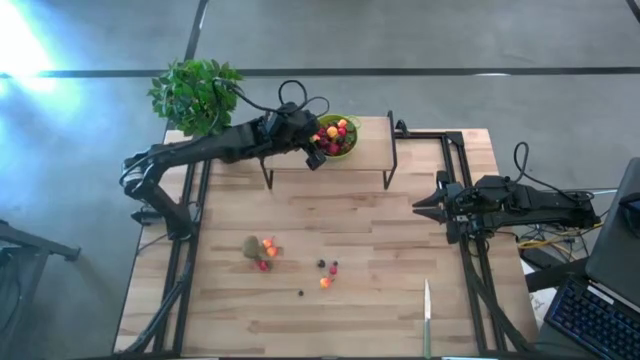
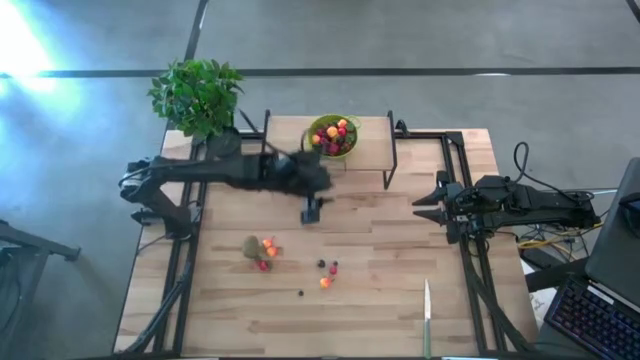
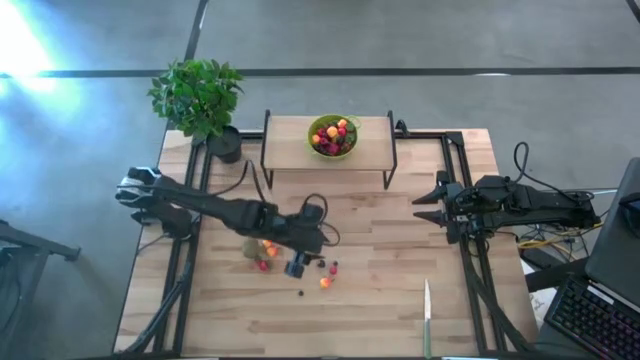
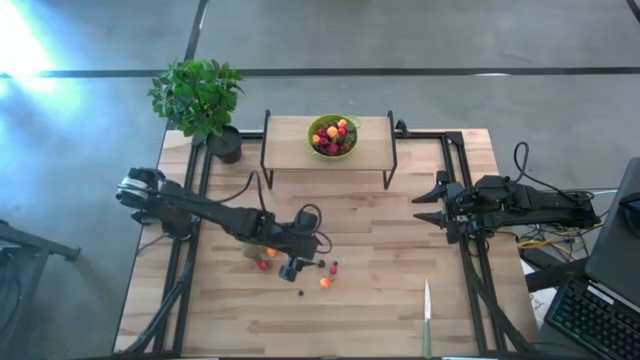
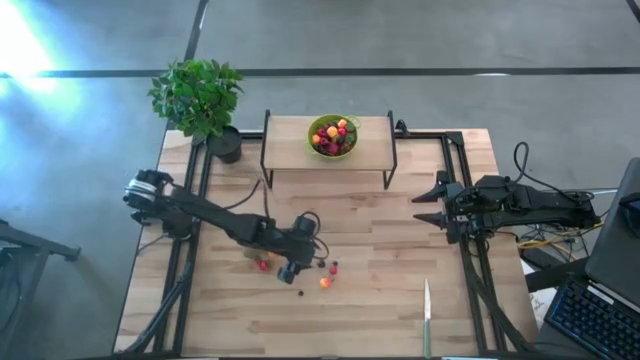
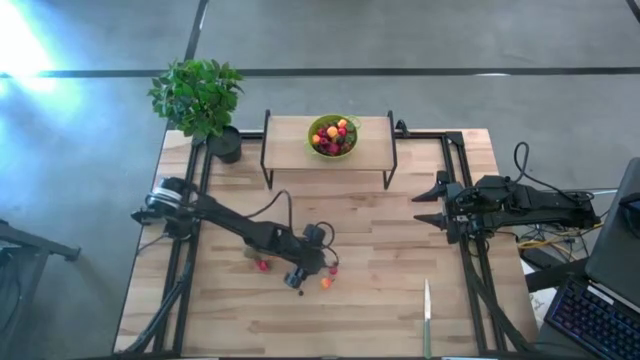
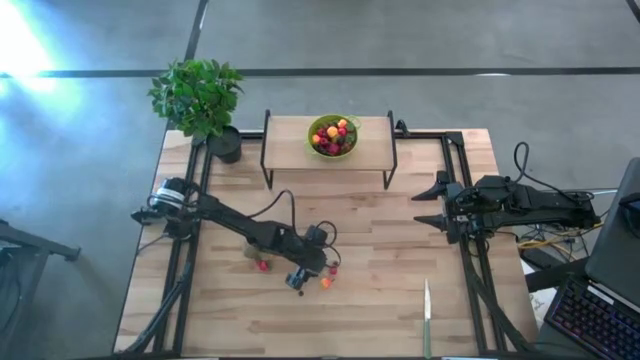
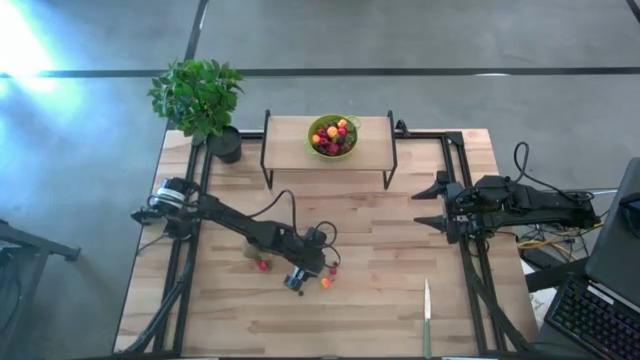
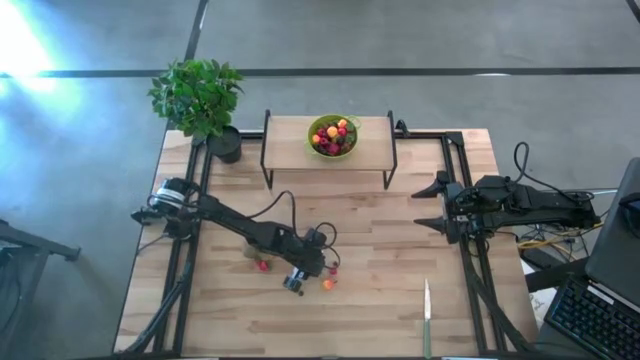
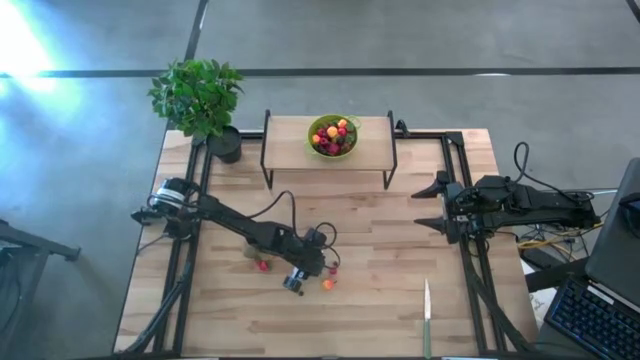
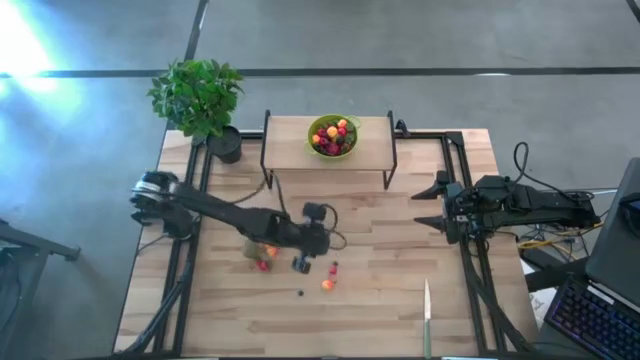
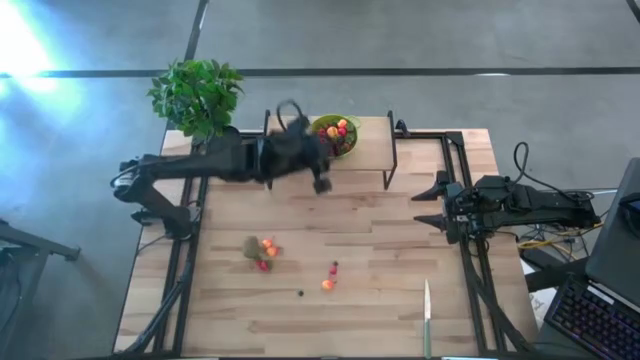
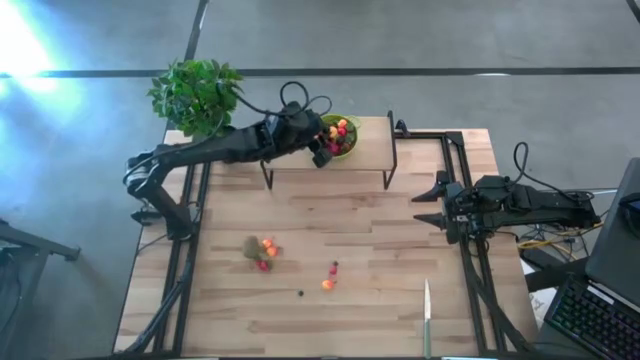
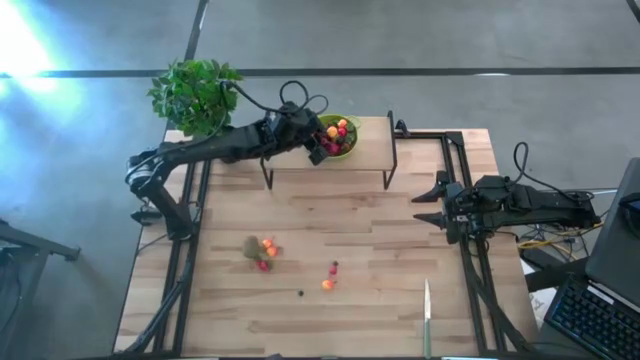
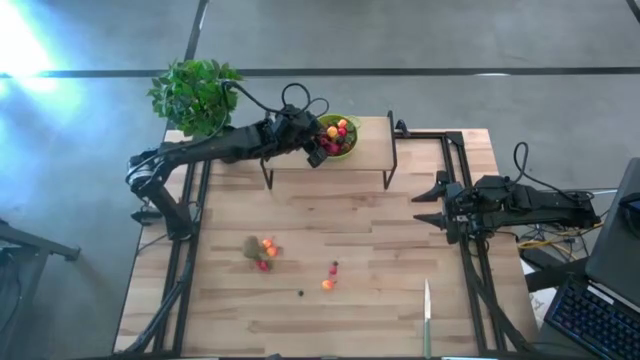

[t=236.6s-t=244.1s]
Task: Pick & Place Fruit
Put the black cherry into the green strainer bowl on the shelf

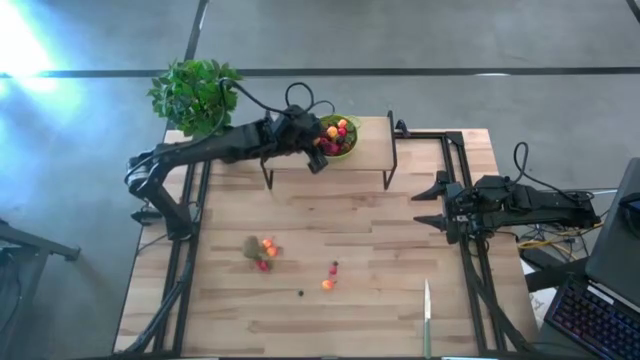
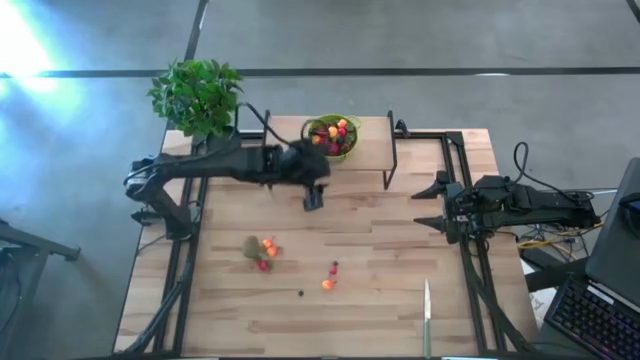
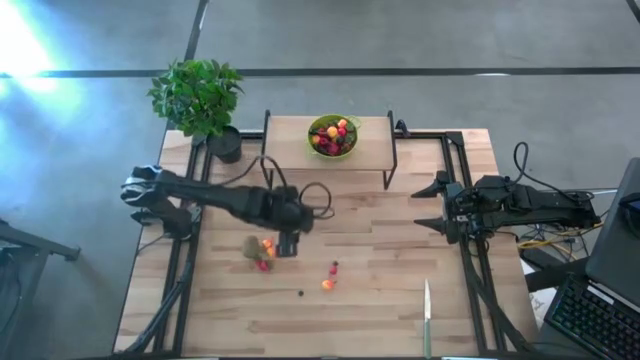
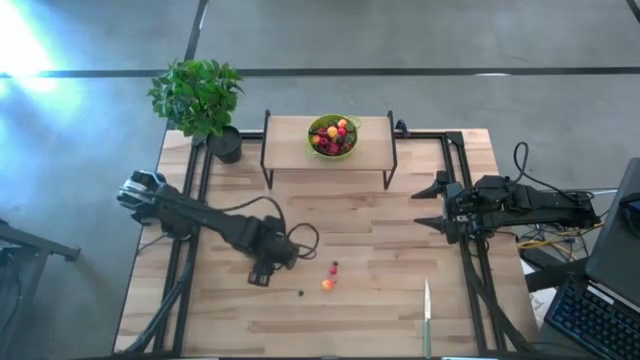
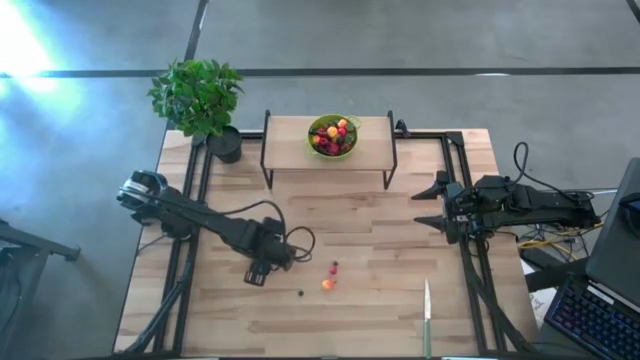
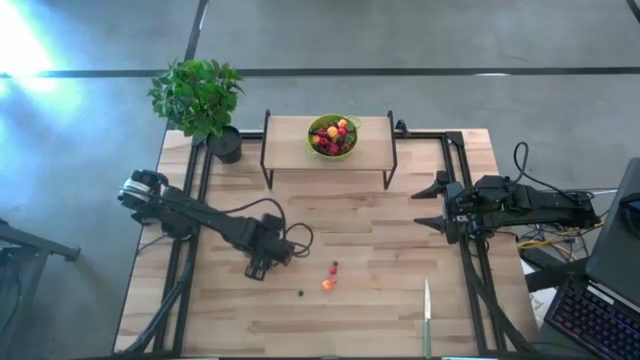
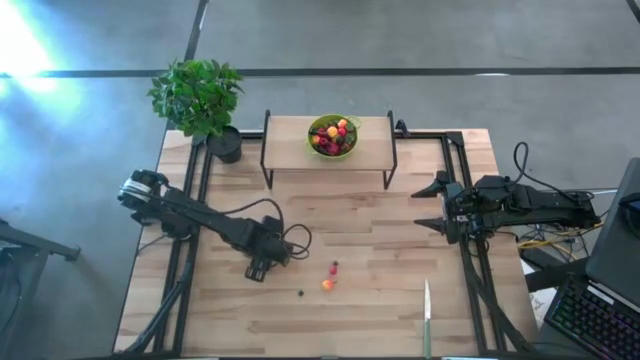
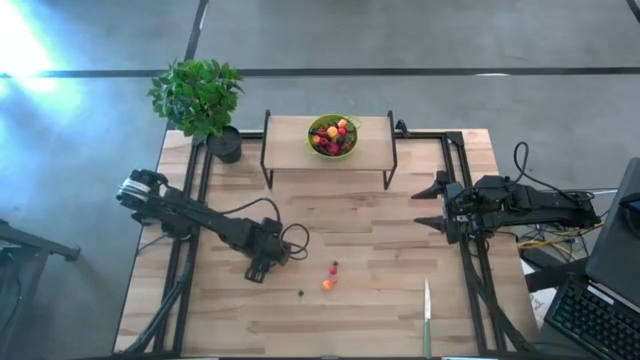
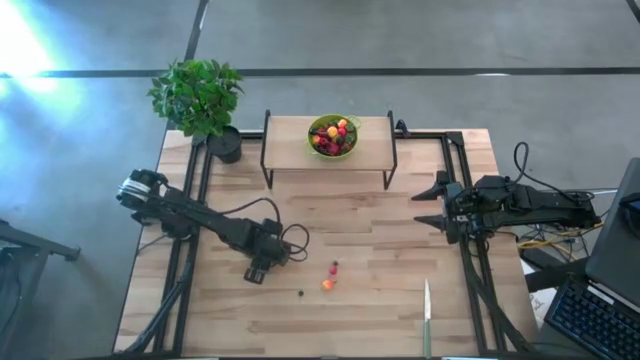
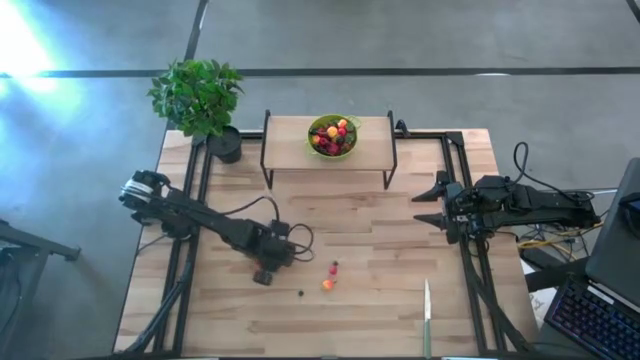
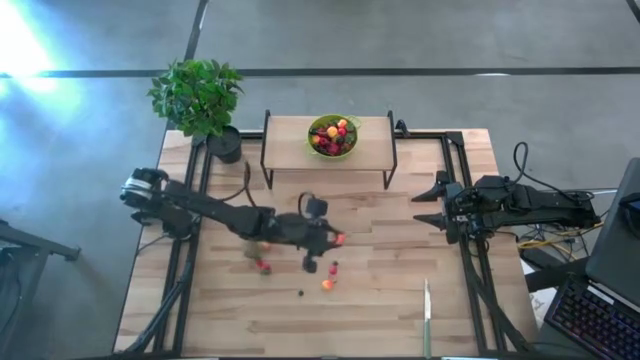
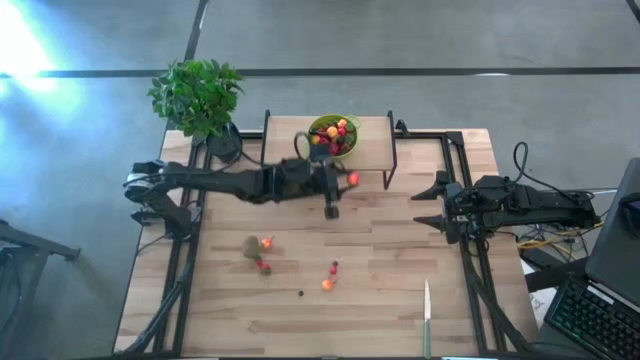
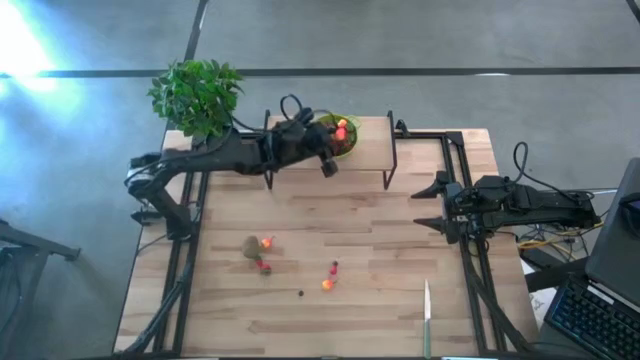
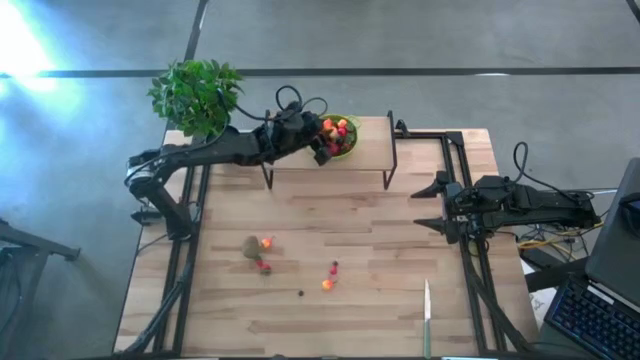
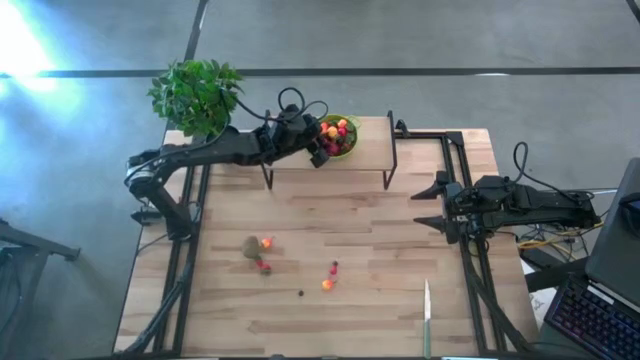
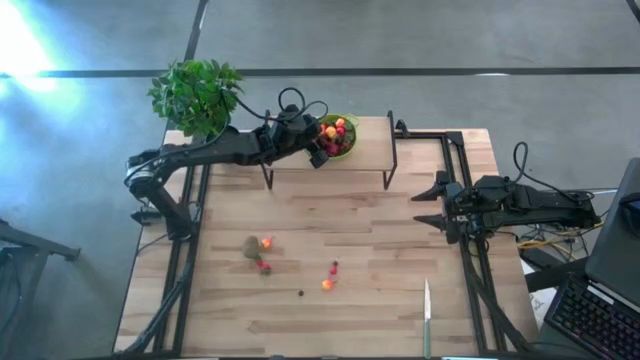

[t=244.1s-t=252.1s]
Put the yellow peach into the green strainer bowl on the shelf

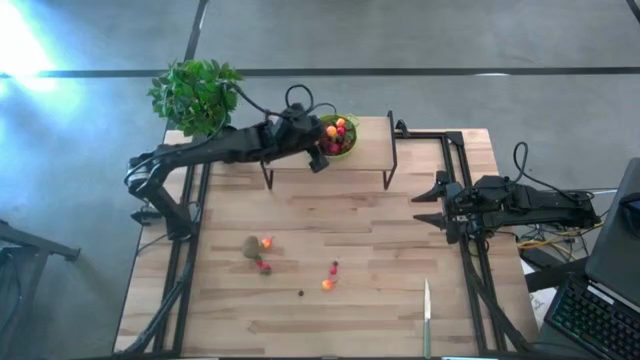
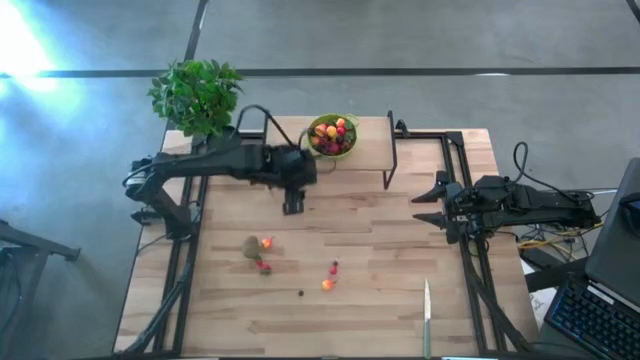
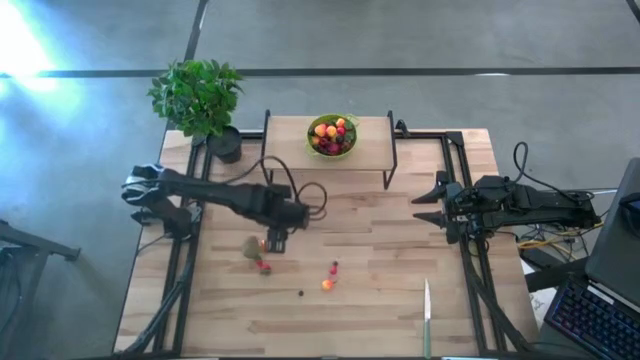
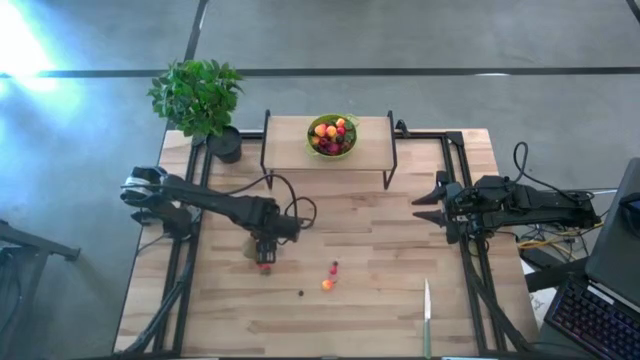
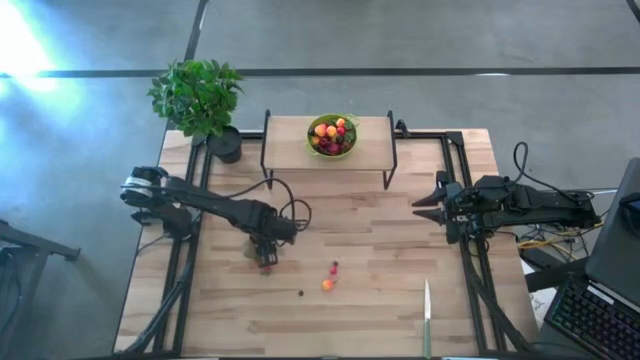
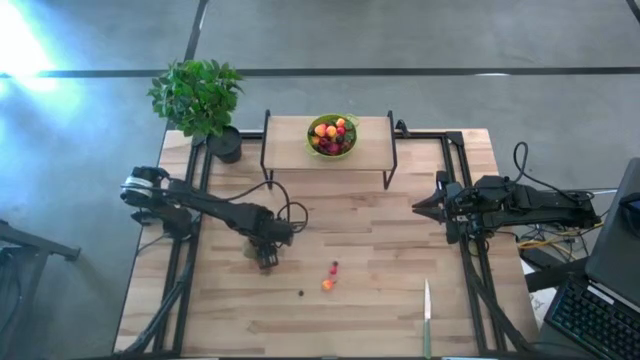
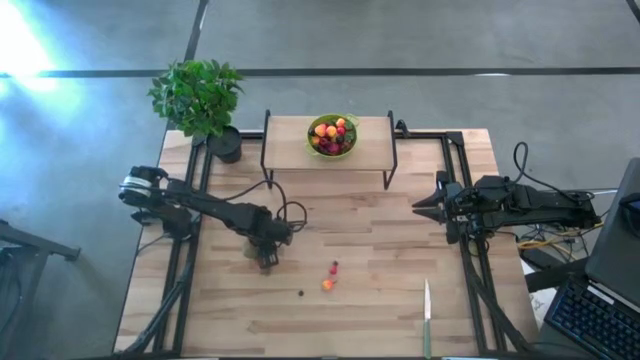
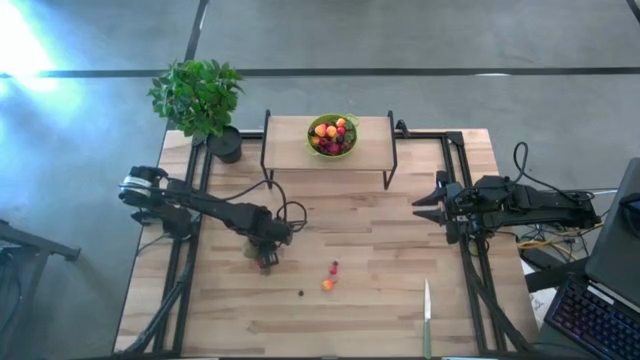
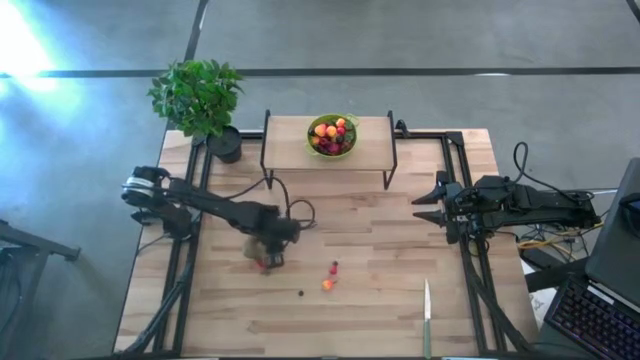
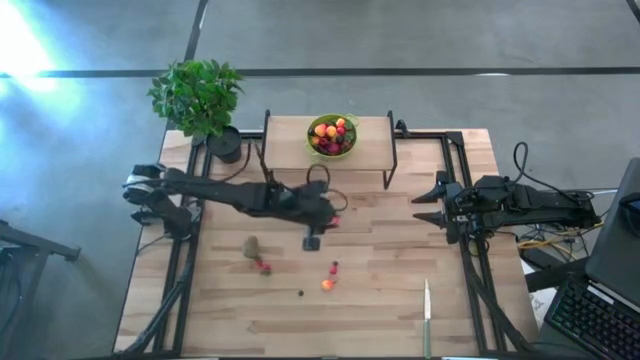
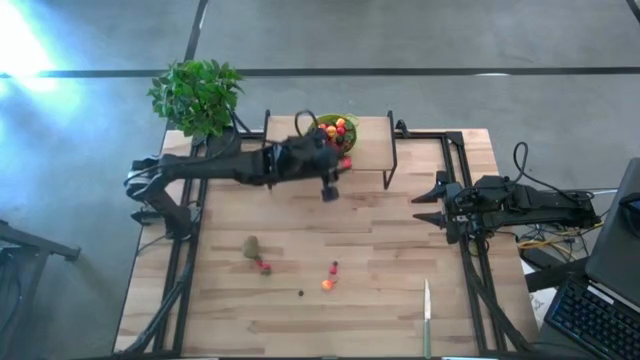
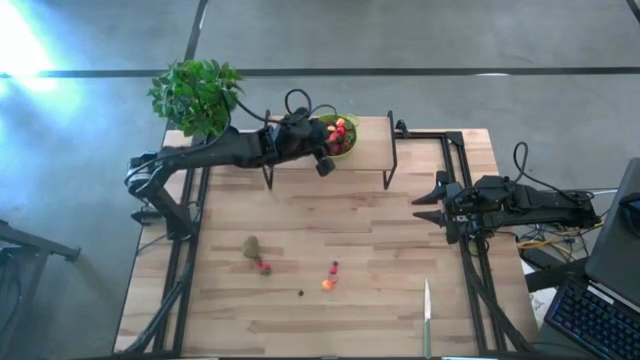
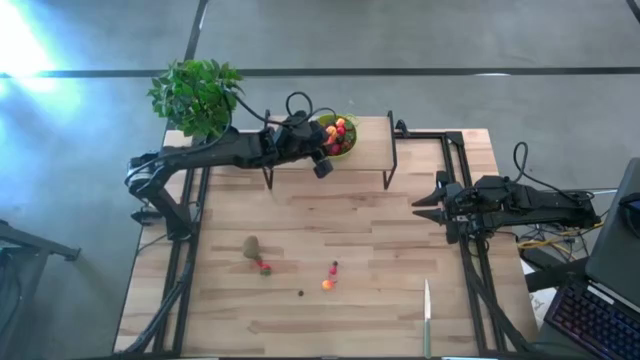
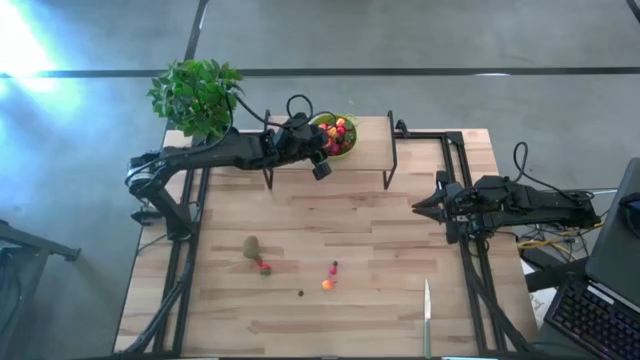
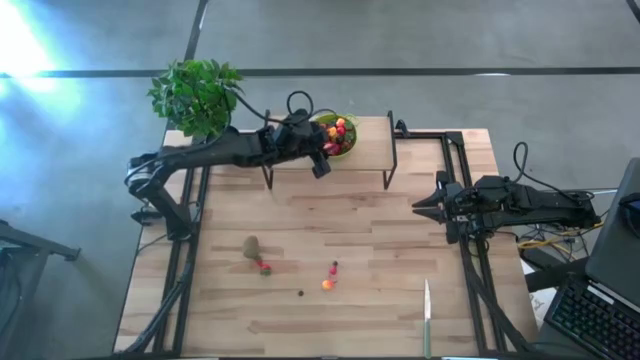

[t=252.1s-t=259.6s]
Put the yellow peach into the green strainer bowl on the shelf
